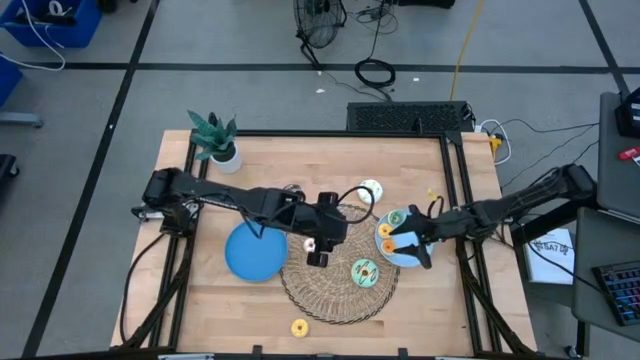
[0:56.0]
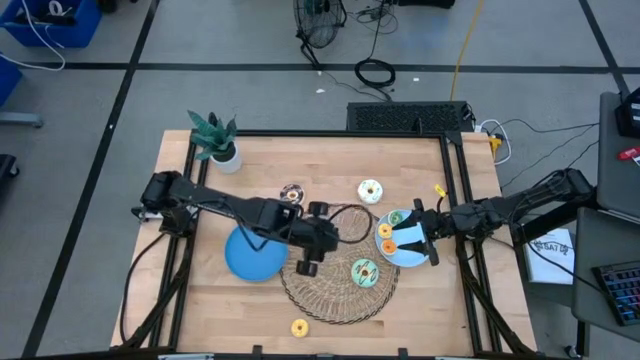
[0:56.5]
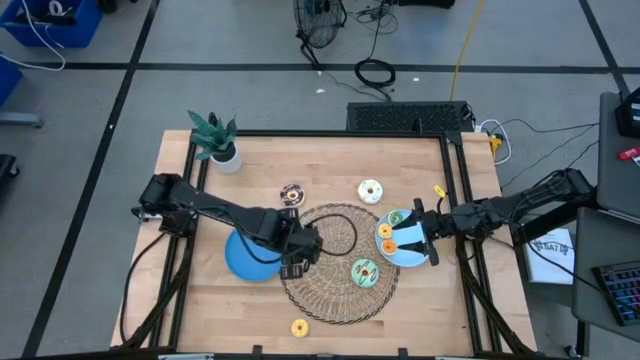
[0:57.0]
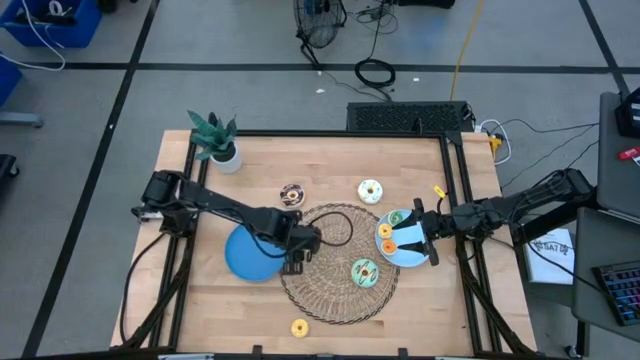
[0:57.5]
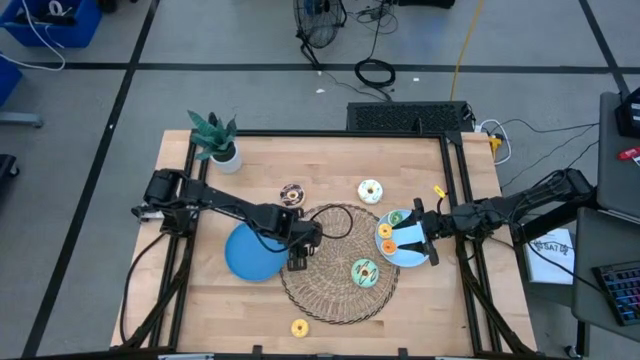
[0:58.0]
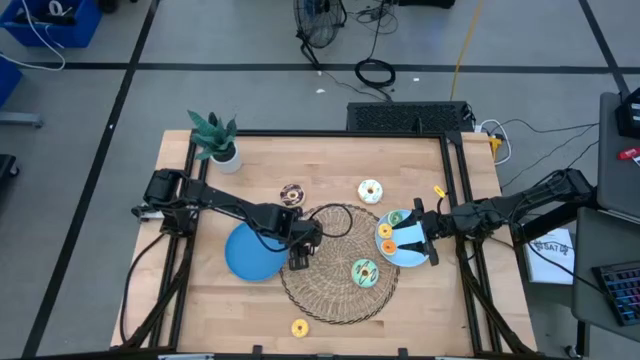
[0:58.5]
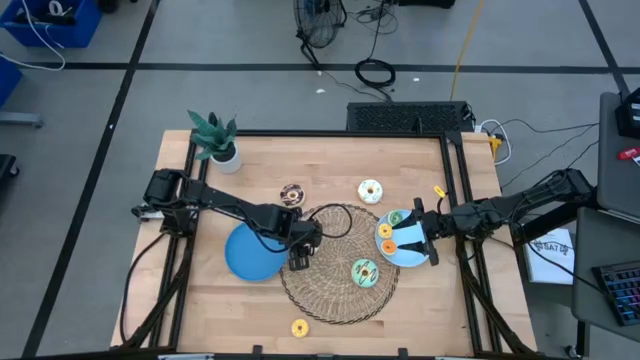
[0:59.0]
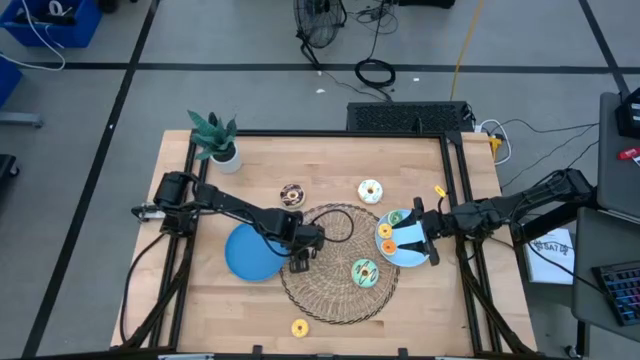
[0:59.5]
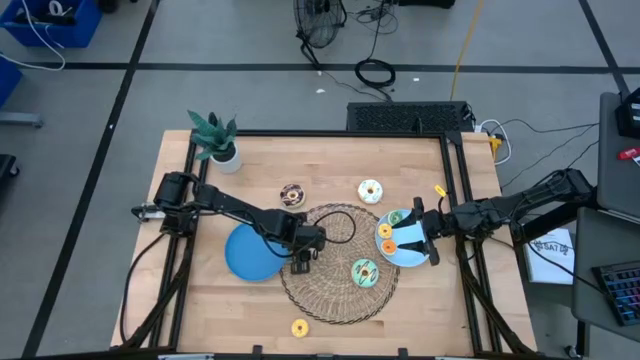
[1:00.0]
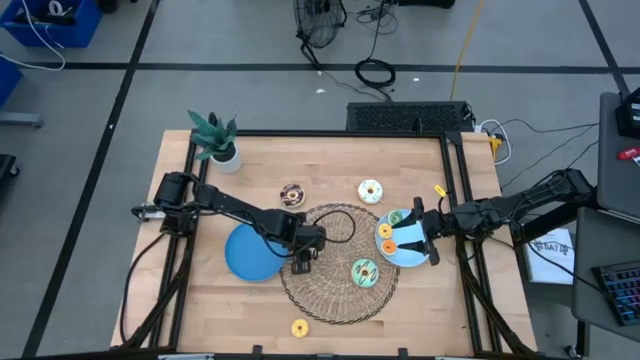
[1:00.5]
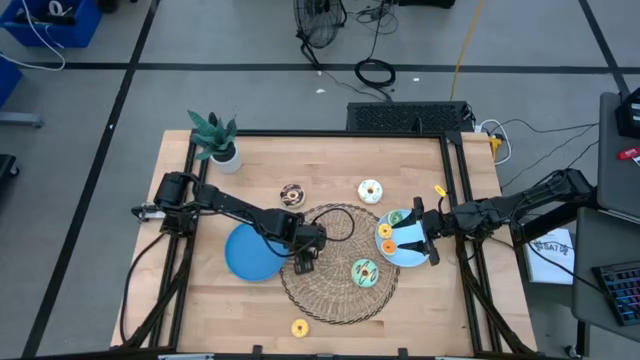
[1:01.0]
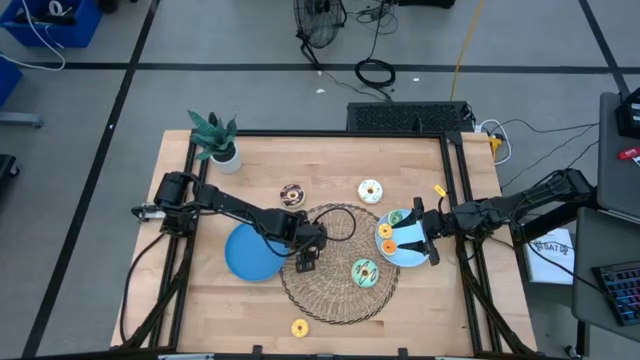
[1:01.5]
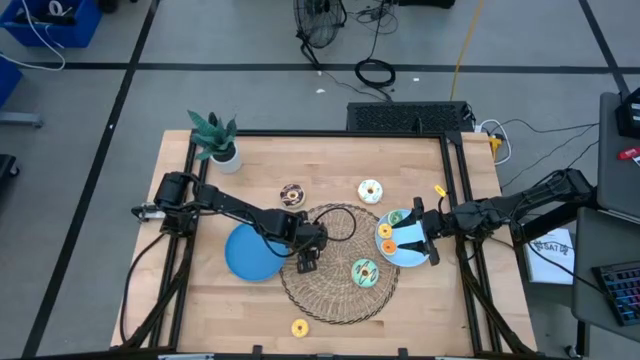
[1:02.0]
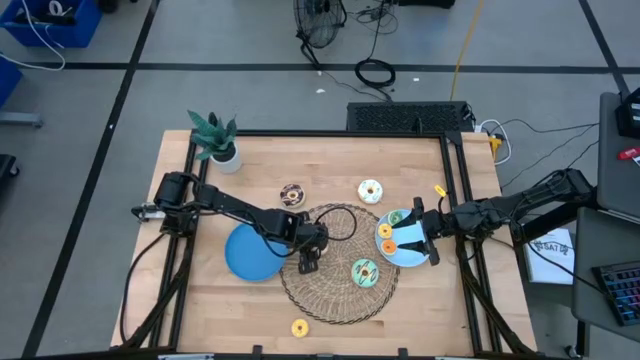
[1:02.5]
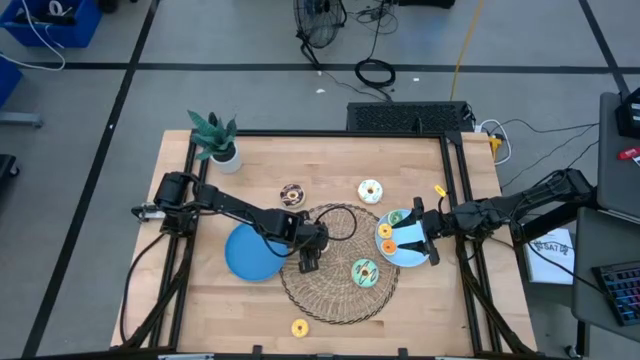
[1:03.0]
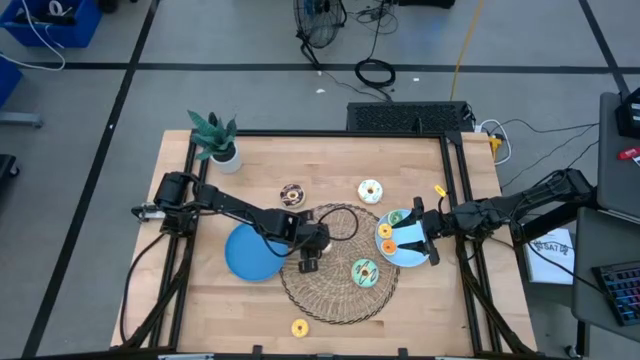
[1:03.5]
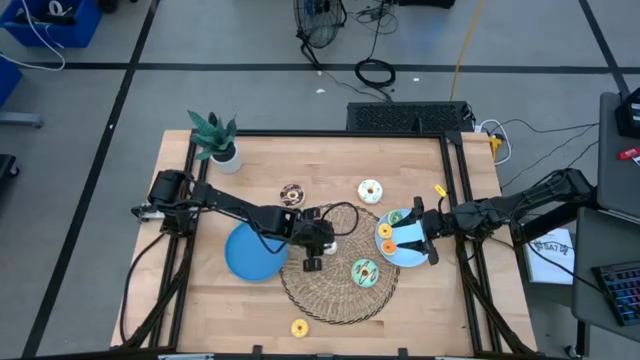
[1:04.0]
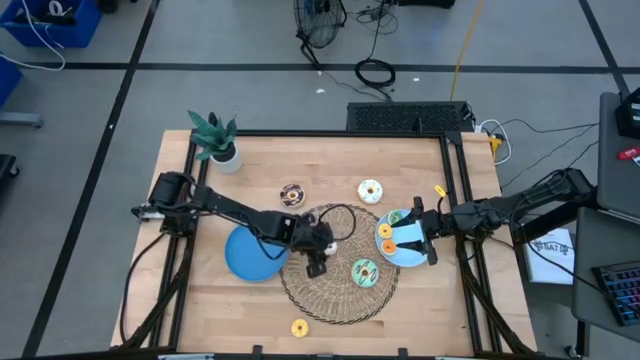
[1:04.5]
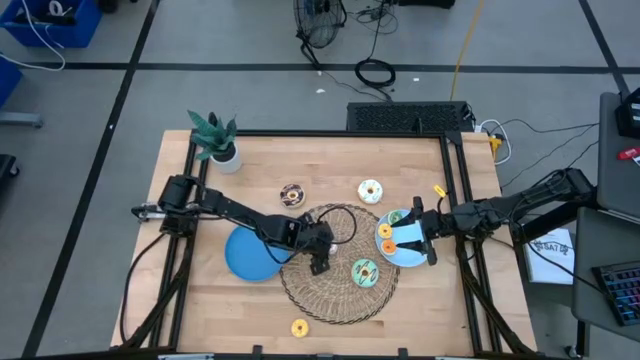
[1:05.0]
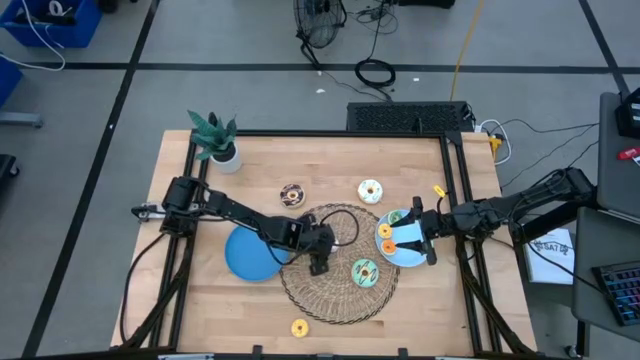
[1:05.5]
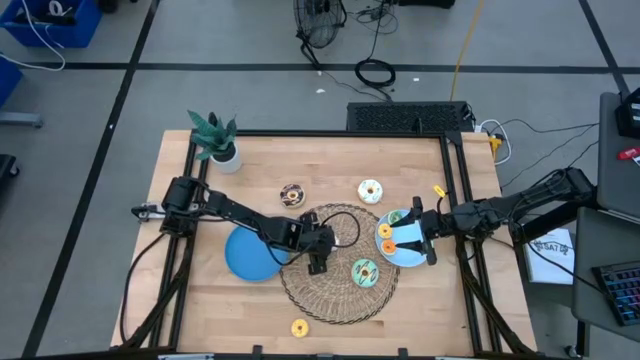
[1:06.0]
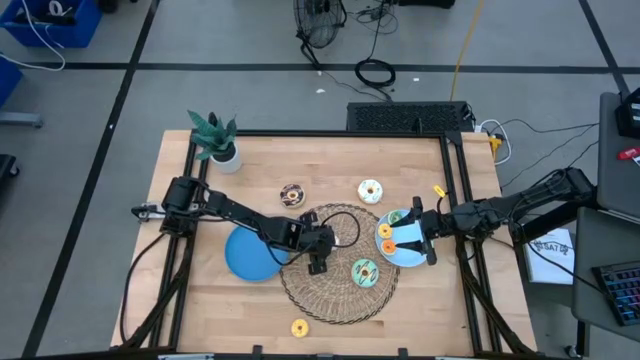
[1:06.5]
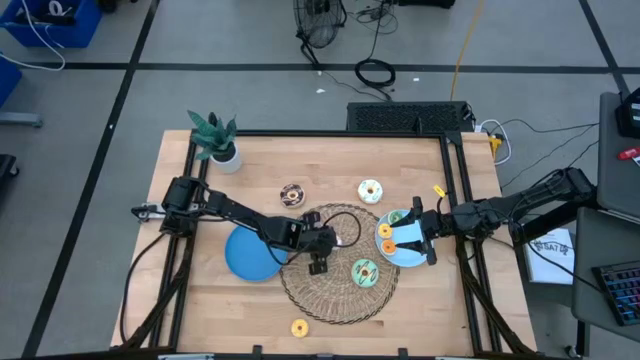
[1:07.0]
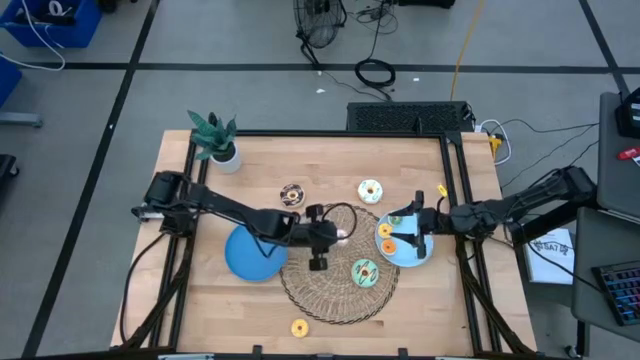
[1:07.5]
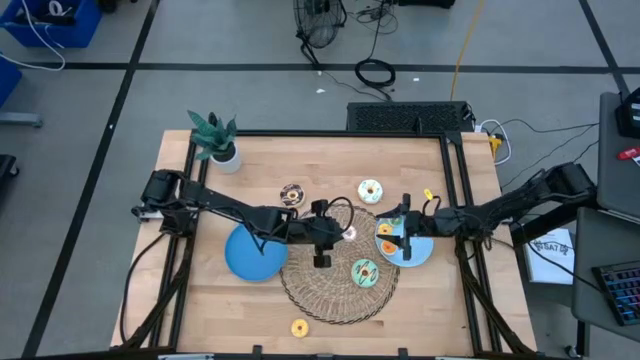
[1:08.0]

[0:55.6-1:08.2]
Task: Pick & Place donuts
Put the small white donut on the light blue plate
